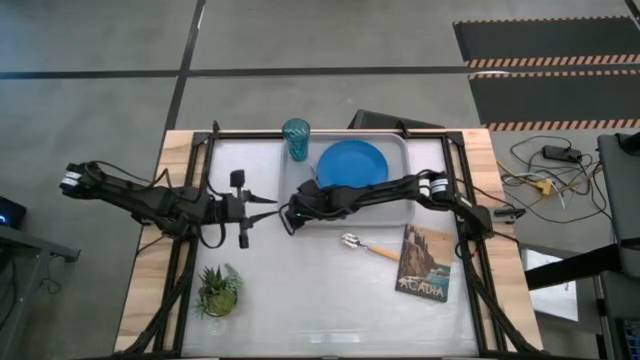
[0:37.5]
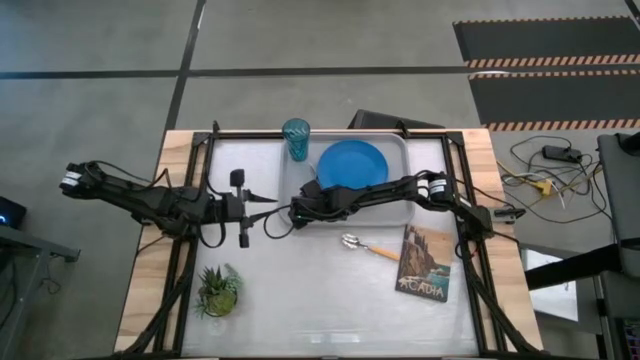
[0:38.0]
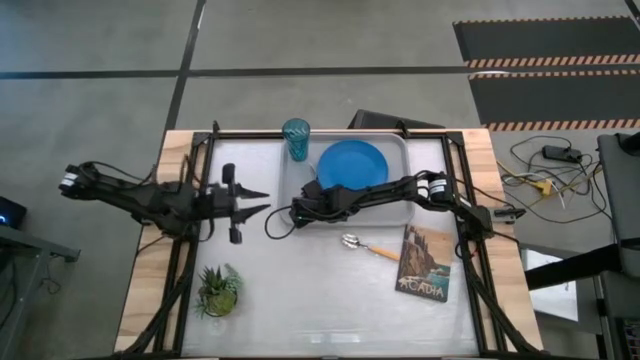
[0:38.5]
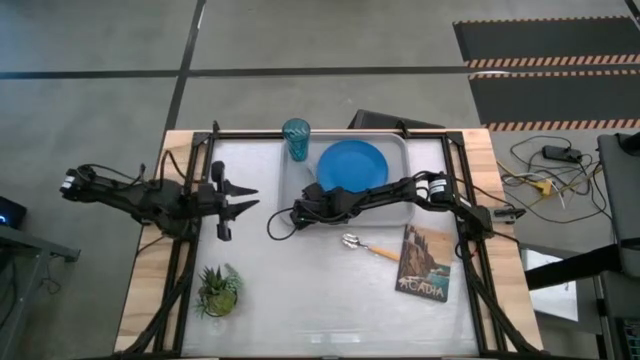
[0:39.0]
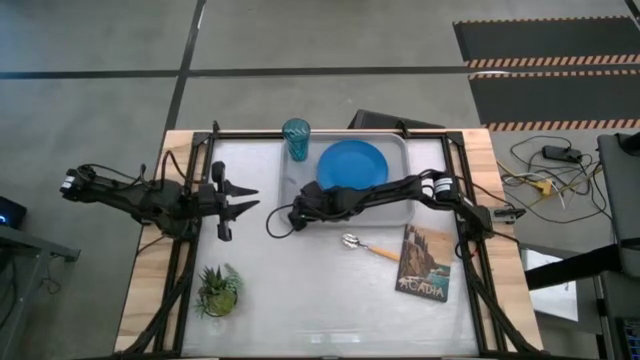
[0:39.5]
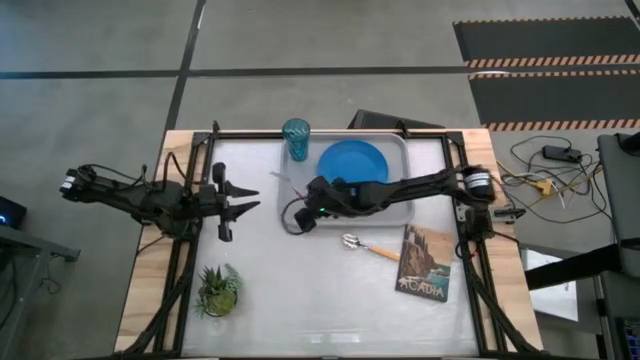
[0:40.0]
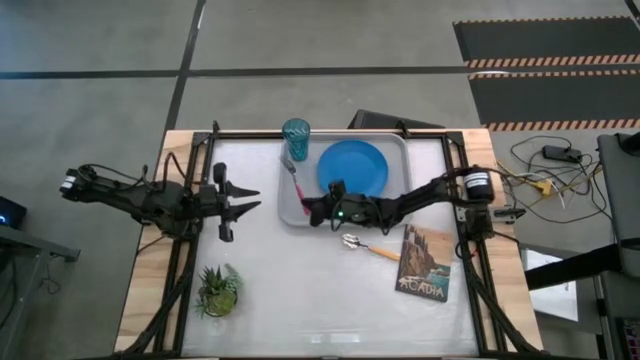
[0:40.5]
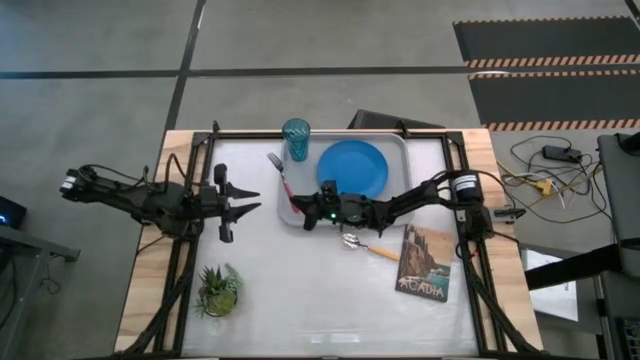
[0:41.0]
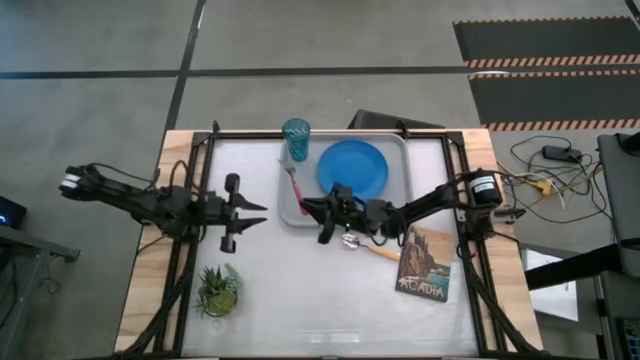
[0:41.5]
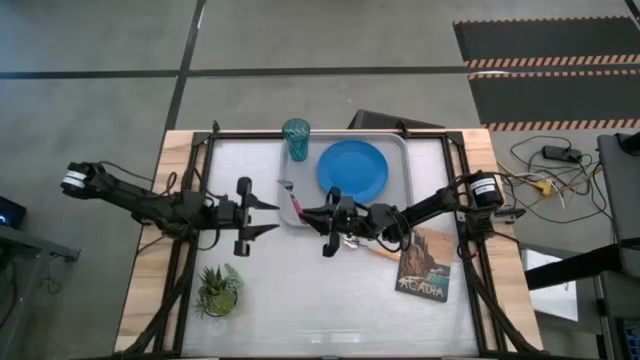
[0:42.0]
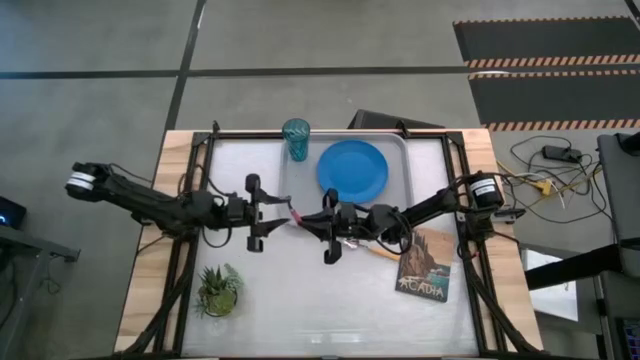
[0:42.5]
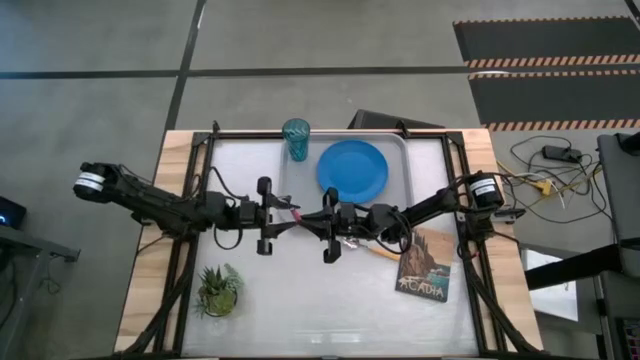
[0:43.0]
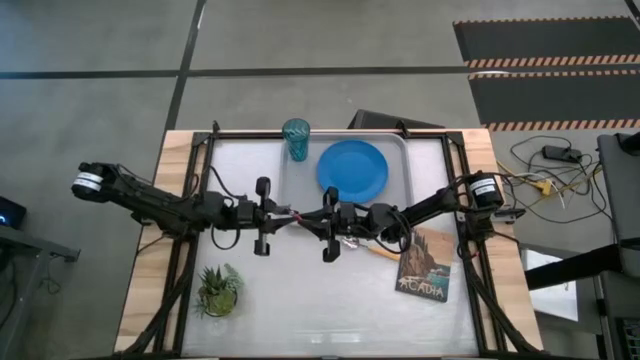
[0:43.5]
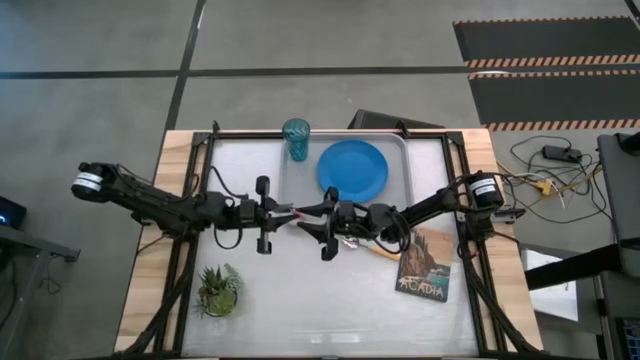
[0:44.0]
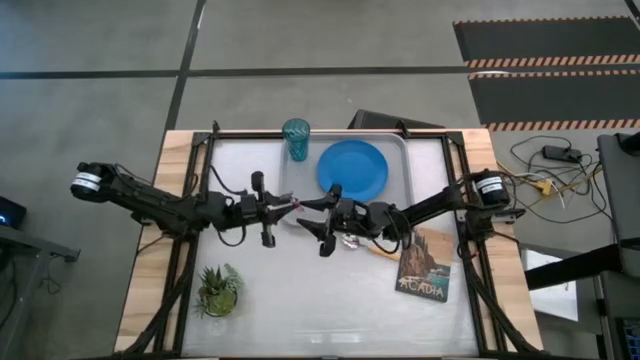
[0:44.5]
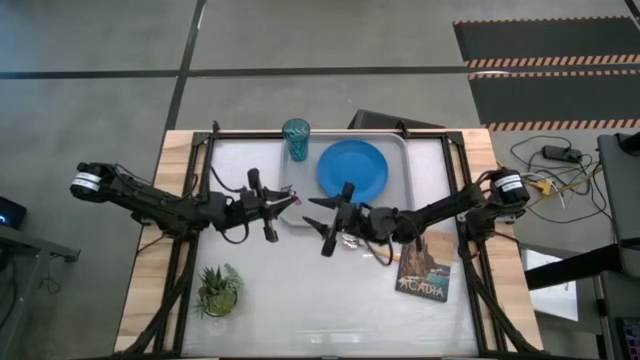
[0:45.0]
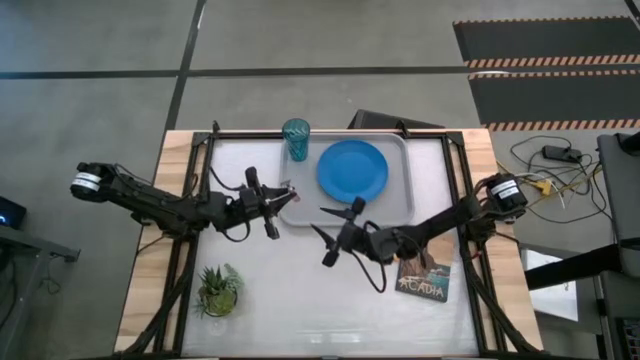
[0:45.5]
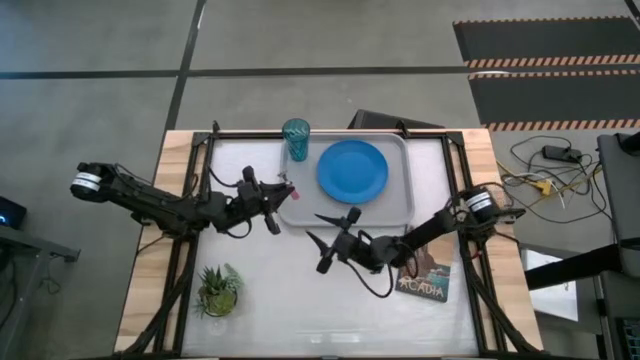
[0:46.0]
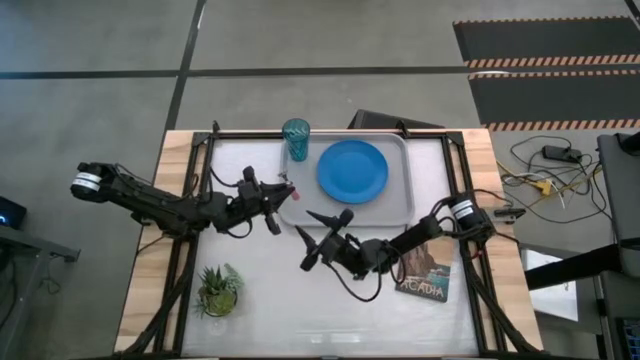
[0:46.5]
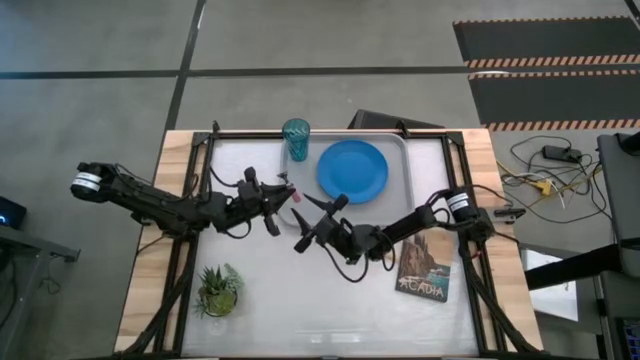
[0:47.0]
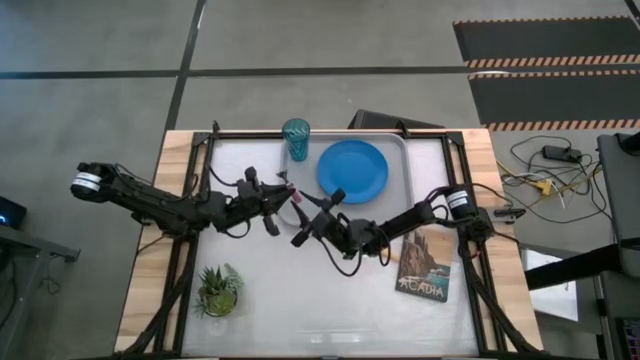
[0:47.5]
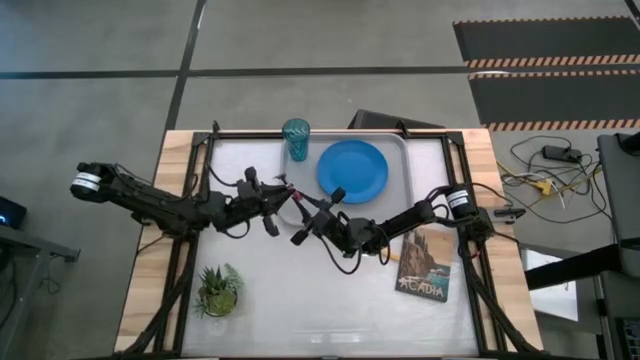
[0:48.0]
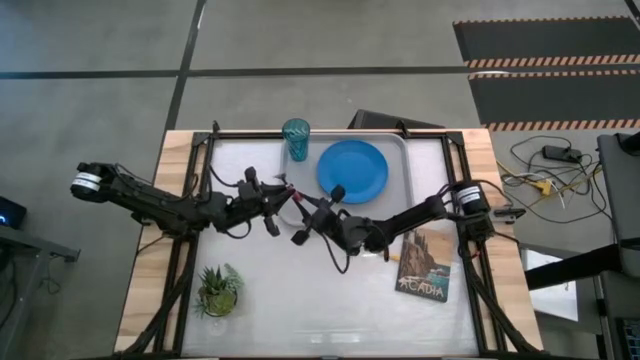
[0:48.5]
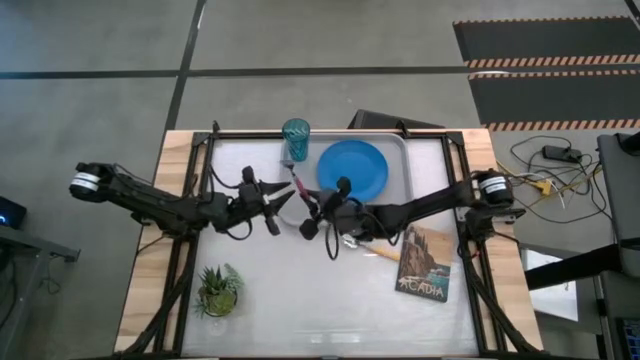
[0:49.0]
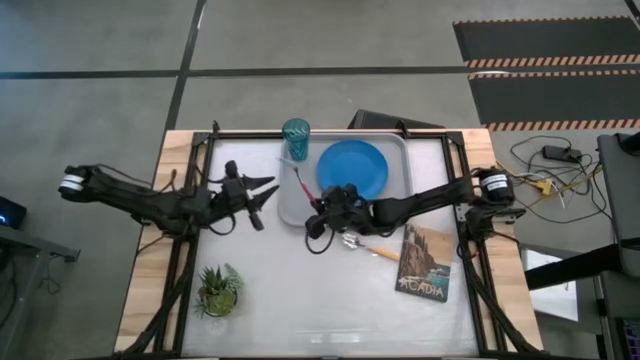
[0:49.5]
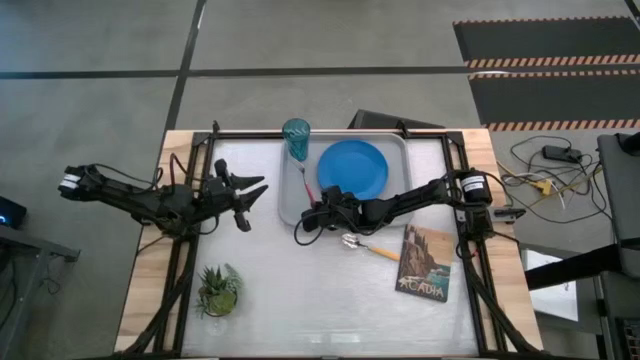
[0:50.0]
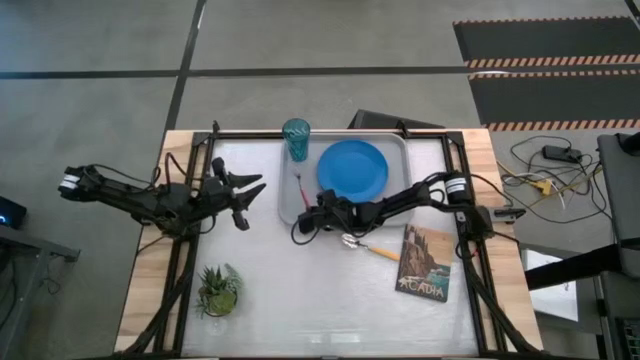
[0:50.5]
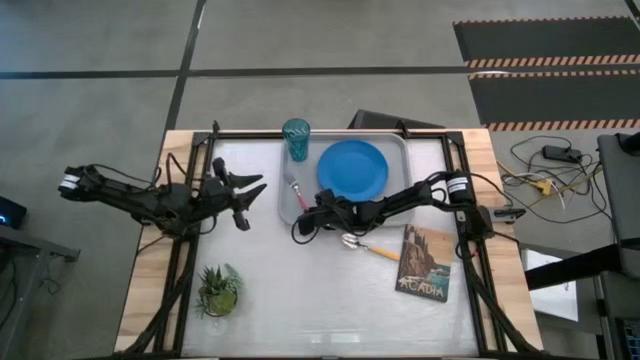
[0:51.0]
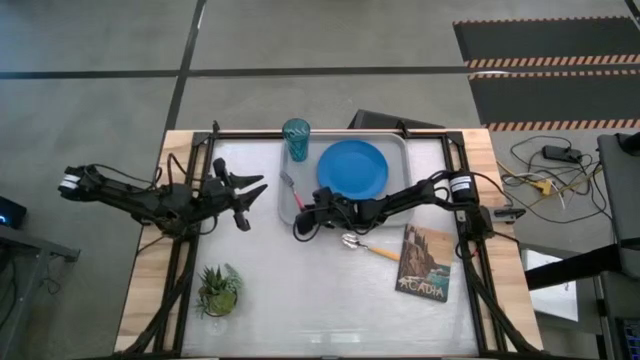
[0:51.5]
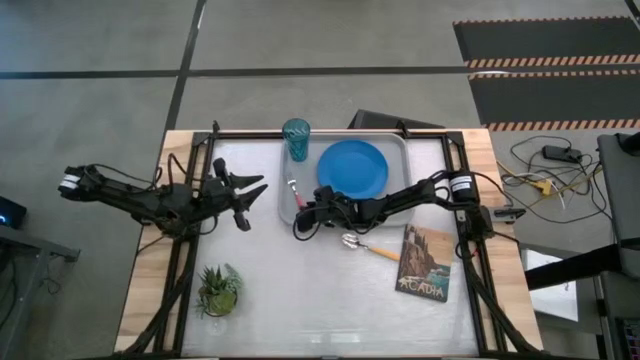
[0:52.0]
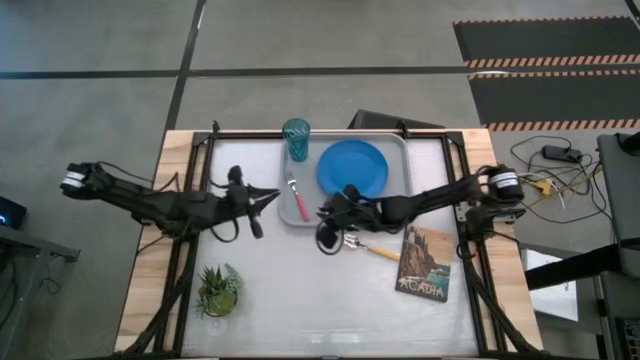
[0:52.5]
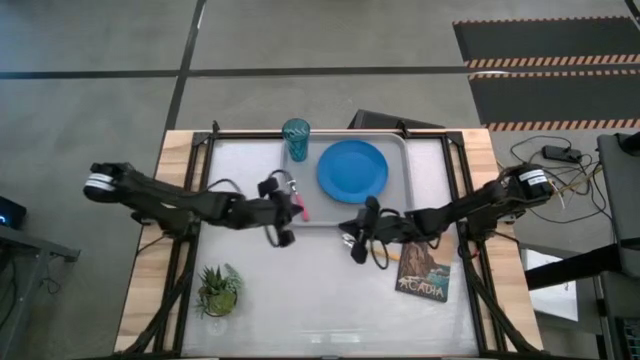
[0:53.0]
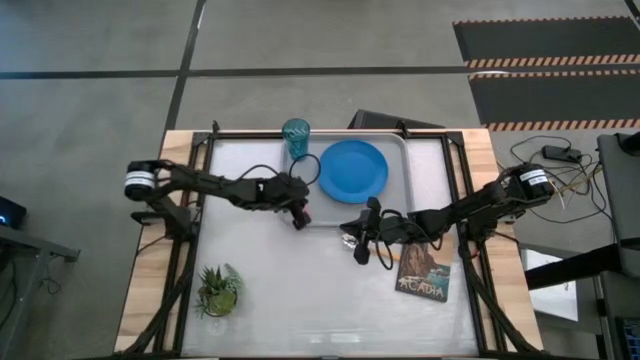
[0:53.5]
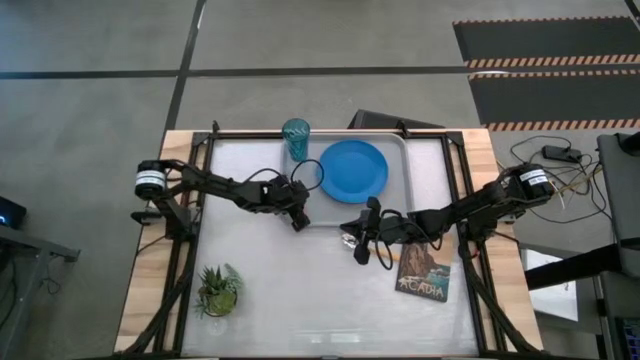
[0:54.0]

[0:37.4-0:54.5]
Task: Pick and place plate/cup/fork/spoon on tray
Put the pink fork on the gray serving tray to the left of the blue plate

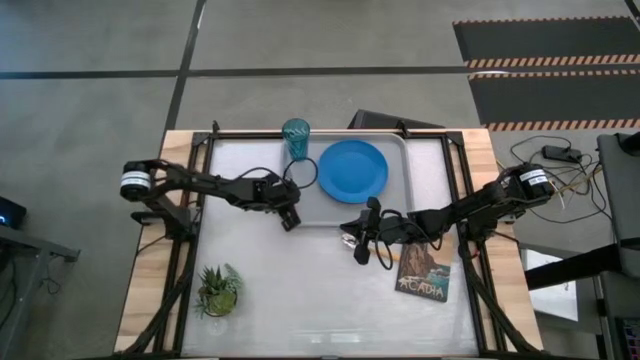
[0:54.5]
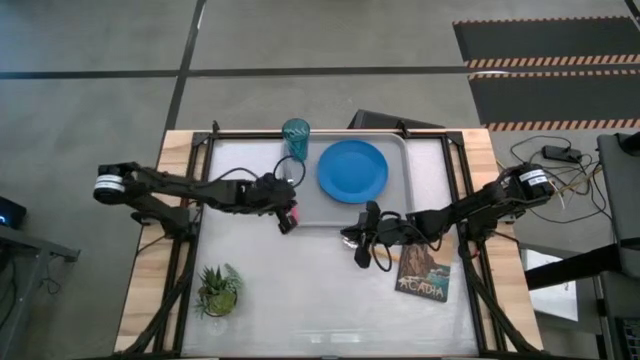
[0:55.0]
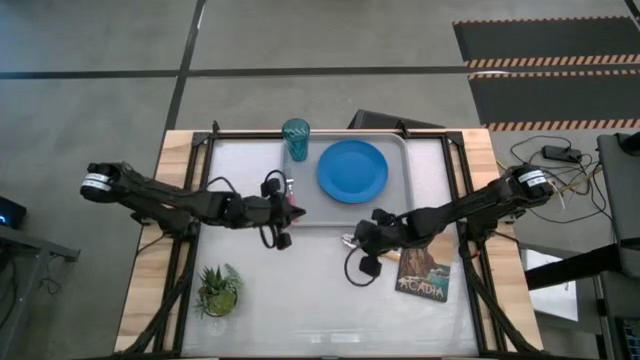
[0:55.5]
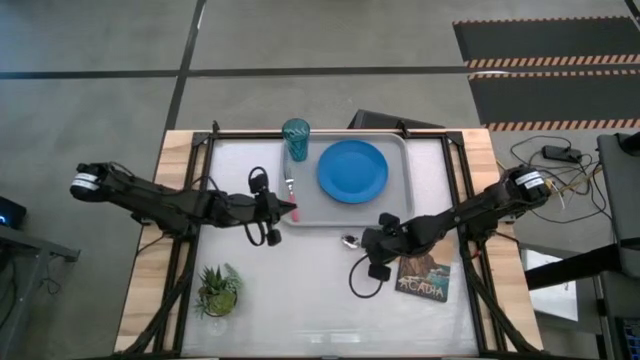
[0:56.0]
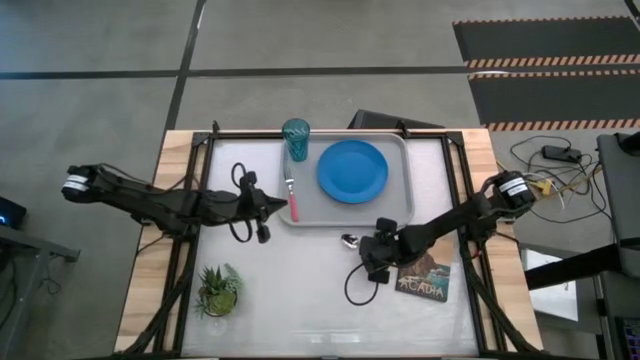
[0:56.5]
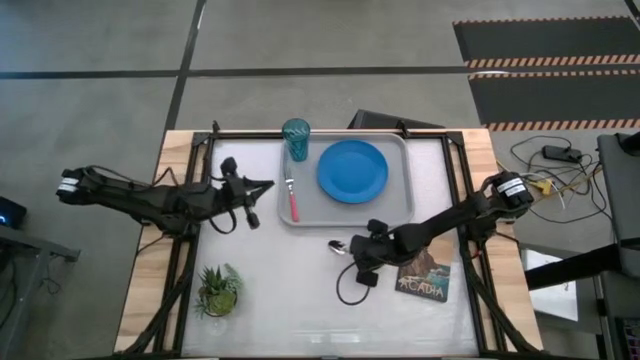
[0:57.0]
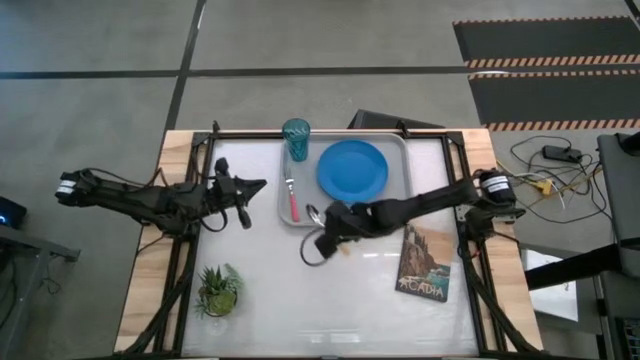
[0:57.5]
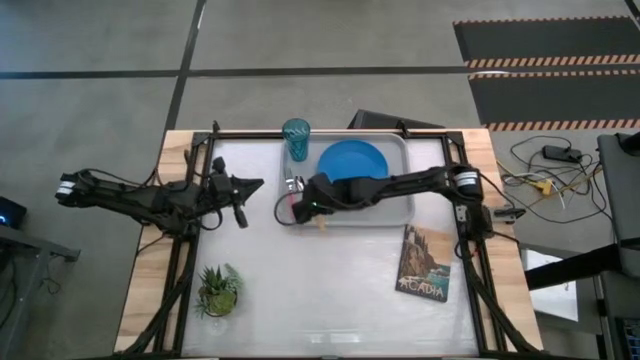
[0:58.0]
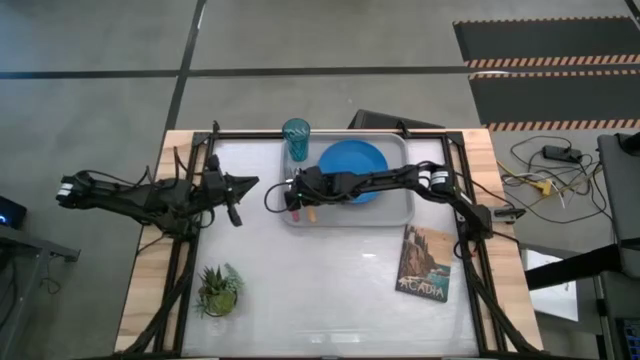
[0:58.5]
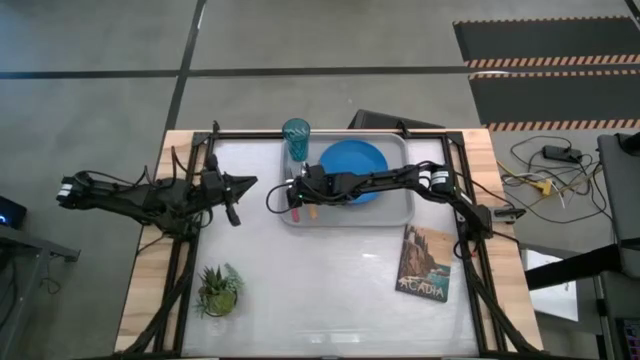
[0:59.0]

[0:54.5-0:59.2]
Put the yellow spoon on the gray serving tray to the left the blue plate
